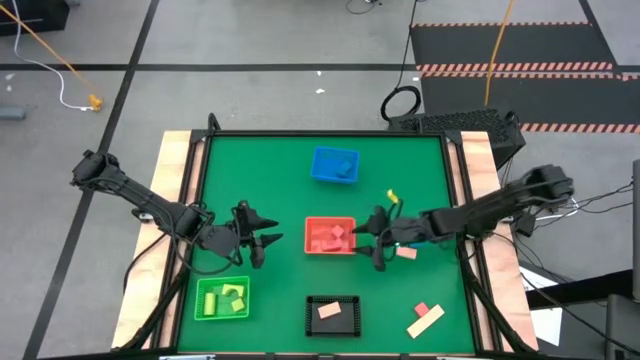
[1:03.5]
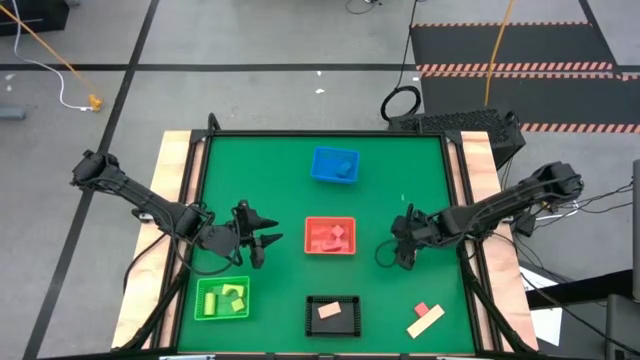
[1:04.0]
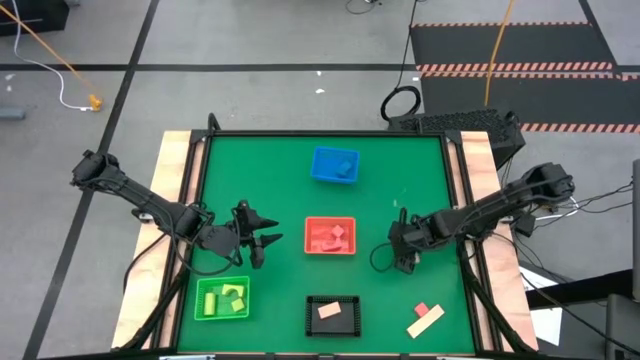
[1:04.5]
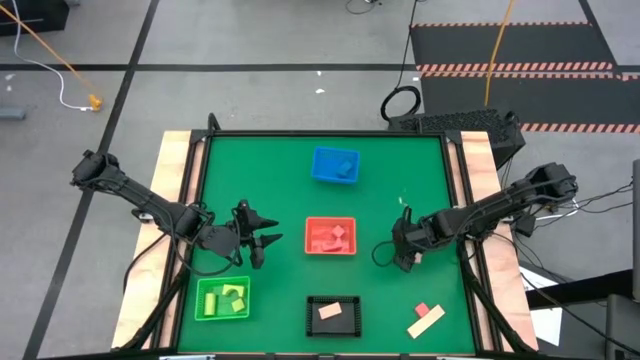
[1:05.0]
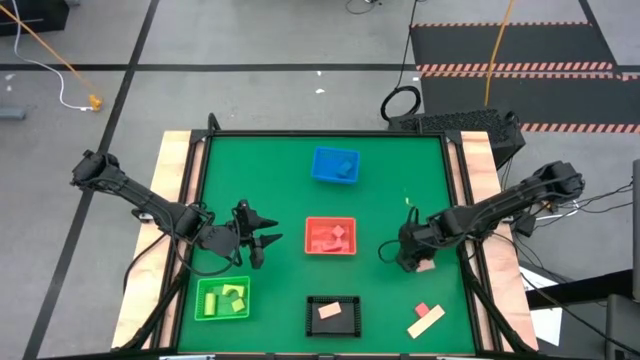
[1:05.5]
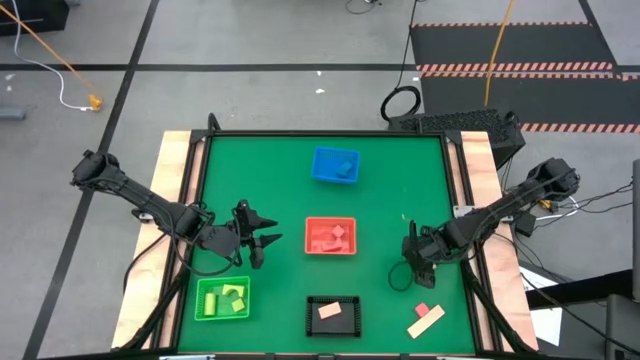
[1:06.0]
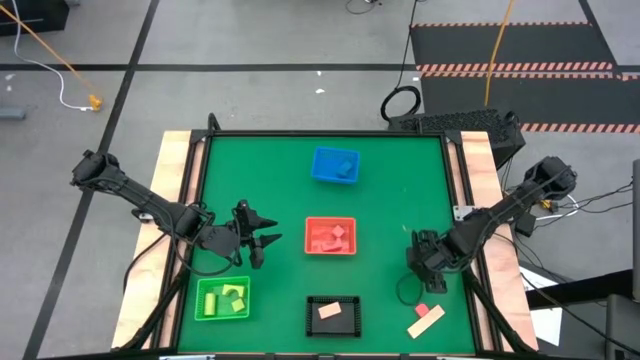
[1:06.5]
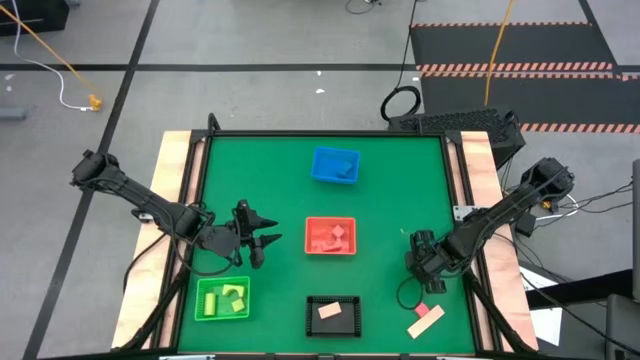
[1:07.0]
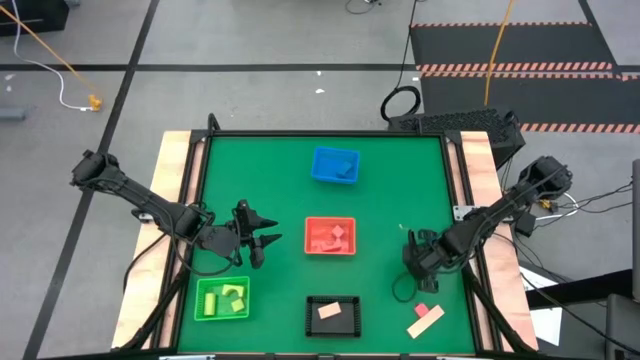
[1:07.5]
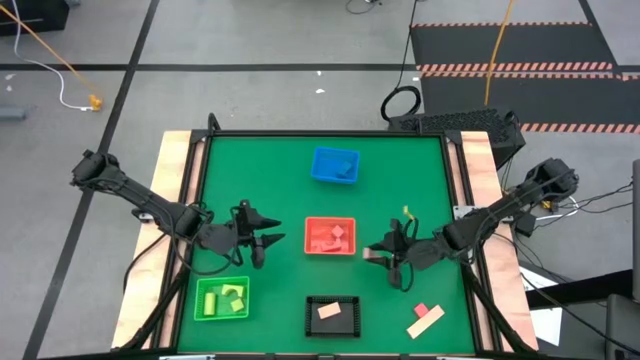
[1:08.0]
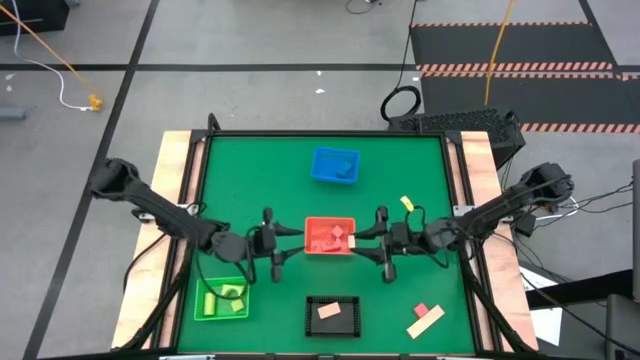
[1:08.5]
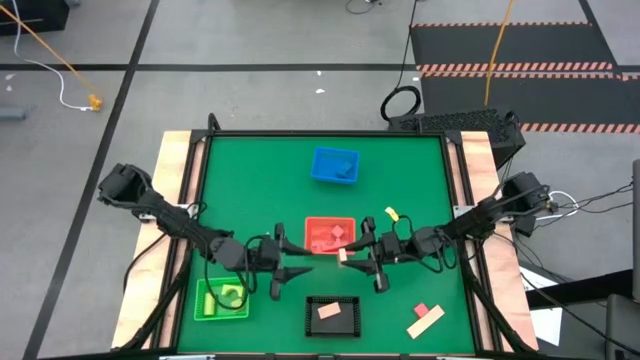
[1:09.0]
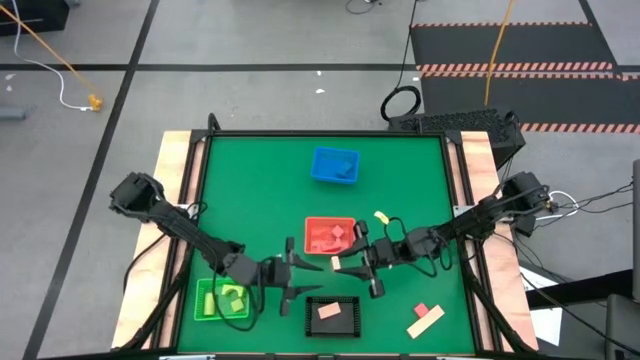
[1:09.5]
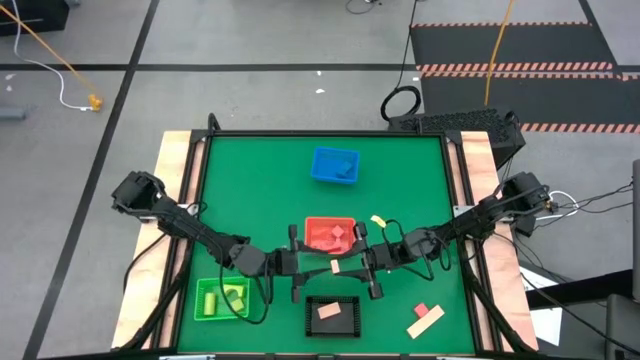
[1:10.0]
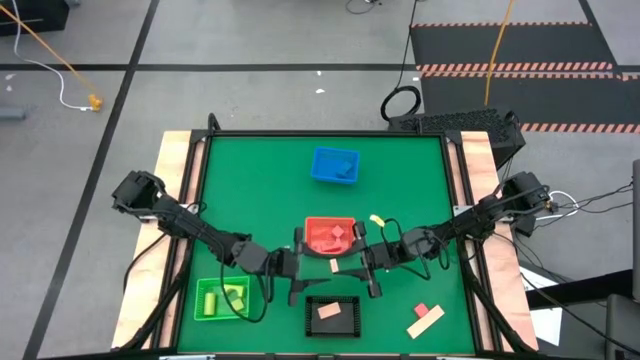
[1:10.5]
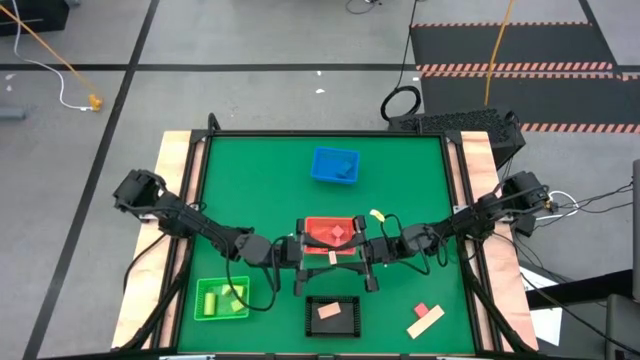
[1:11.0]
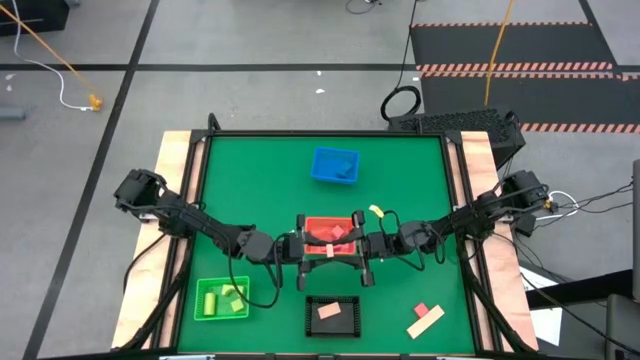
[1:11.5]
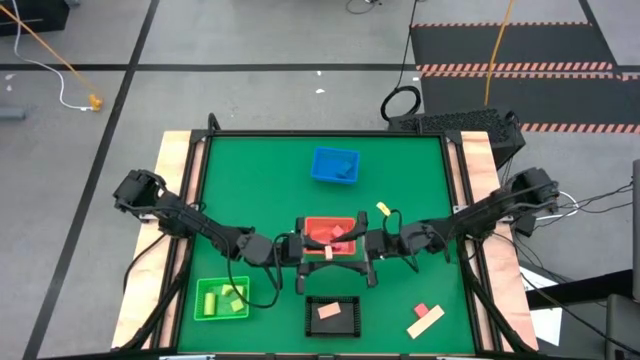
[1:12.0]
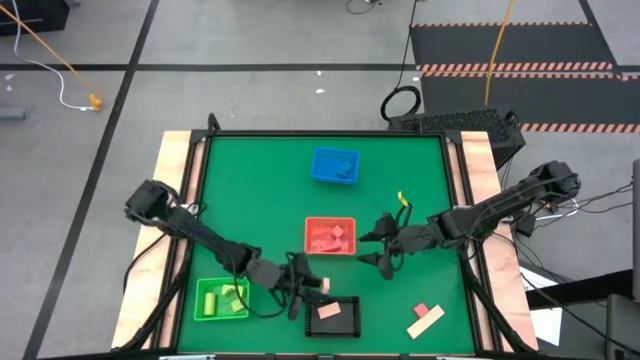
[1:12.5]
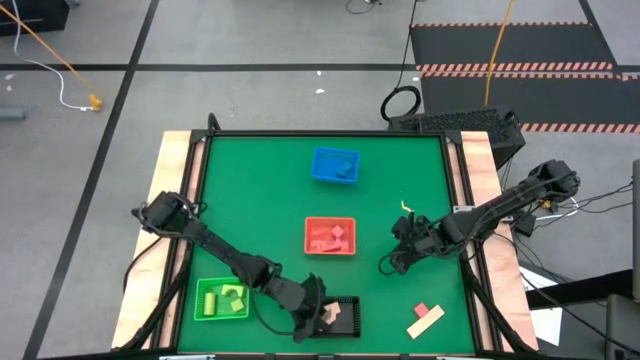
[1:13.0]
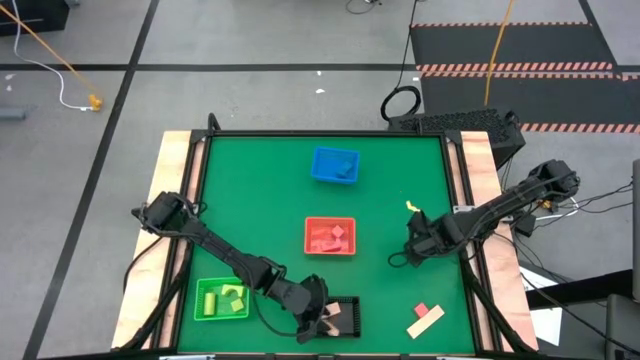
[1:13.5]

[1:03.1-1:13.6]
Task: Sort & place blocks by color
Put the top brown block into the black bin

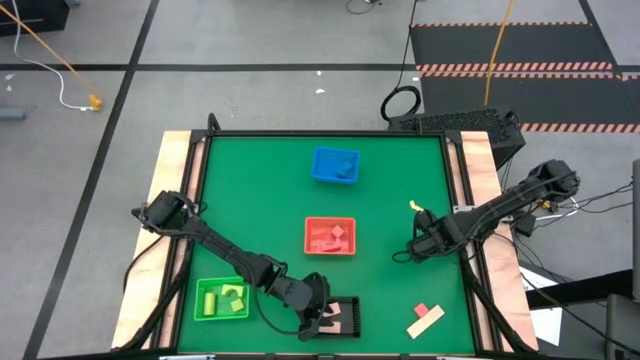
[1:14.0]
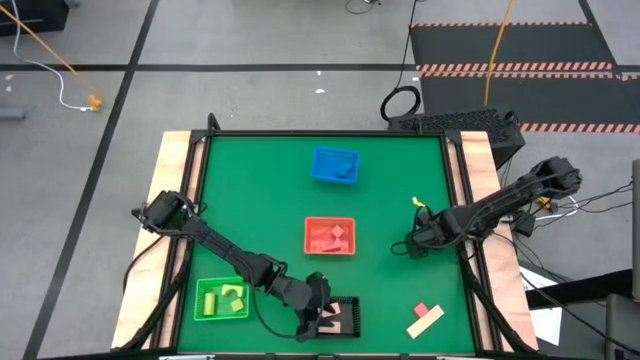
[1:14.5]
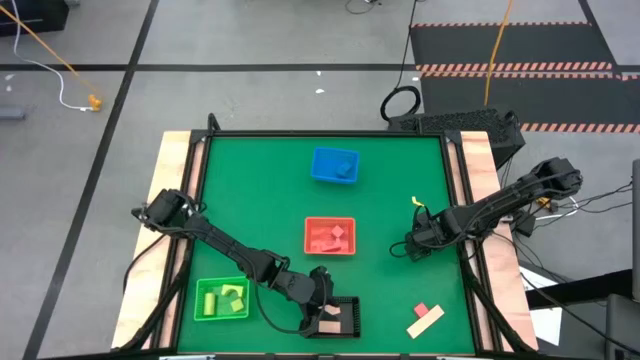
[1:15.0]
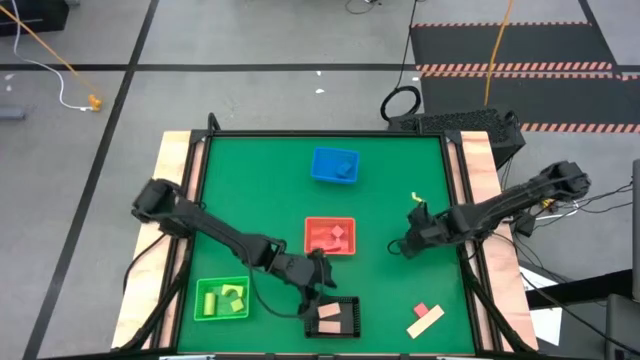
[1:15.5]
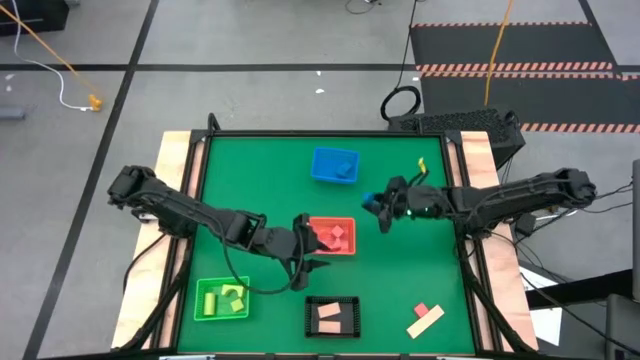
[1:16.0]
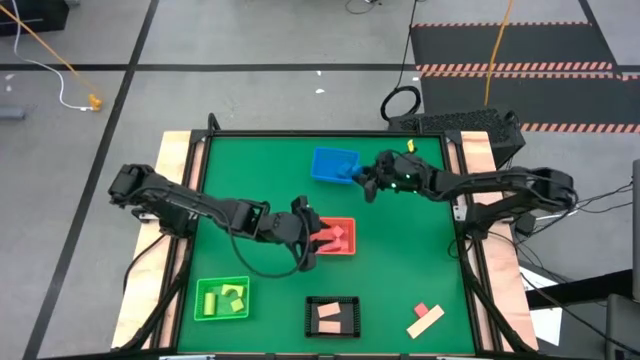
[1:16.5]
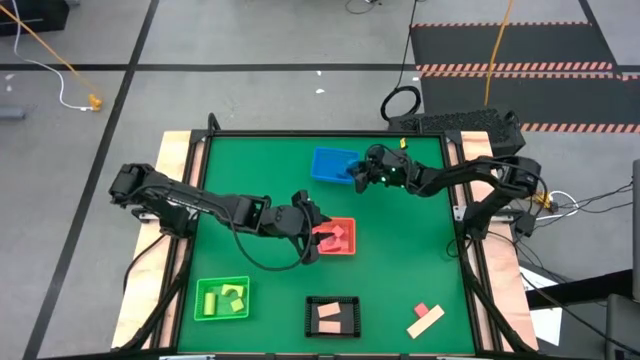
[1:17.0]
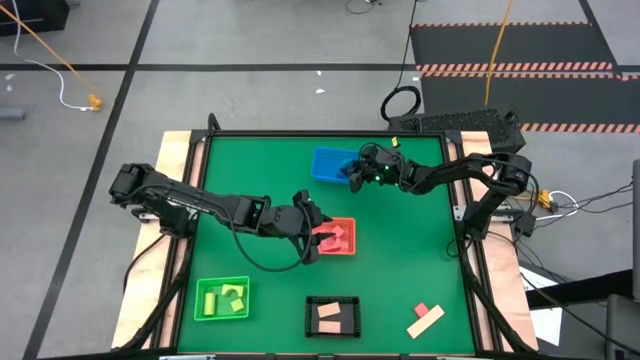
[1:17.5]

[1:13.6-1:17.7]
Put the blue block into the blue bin

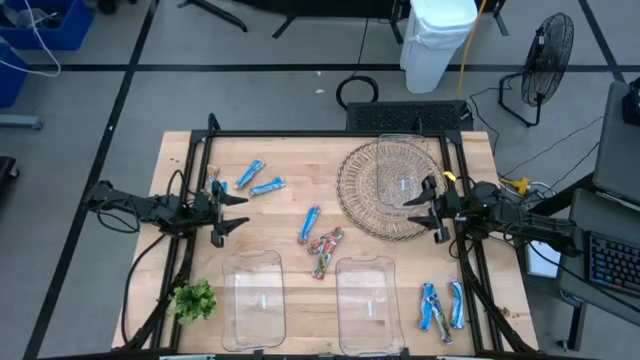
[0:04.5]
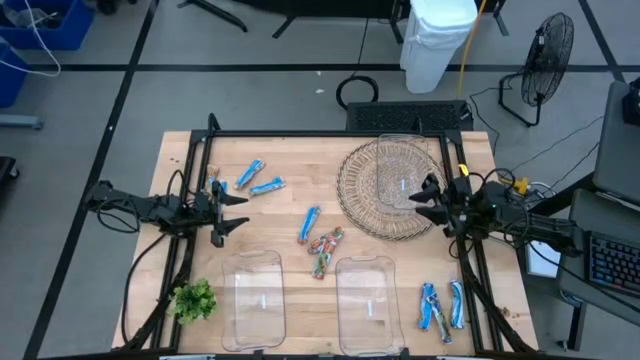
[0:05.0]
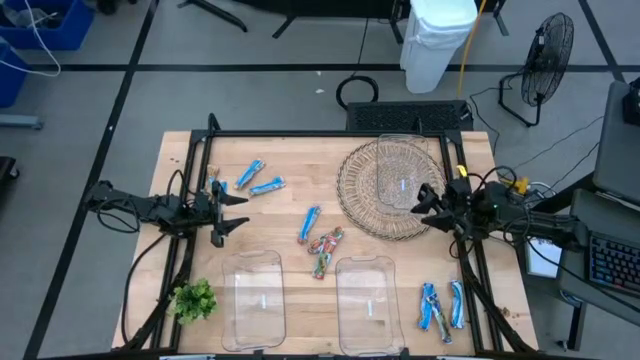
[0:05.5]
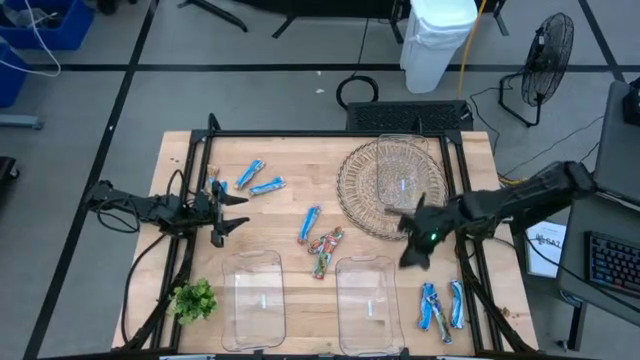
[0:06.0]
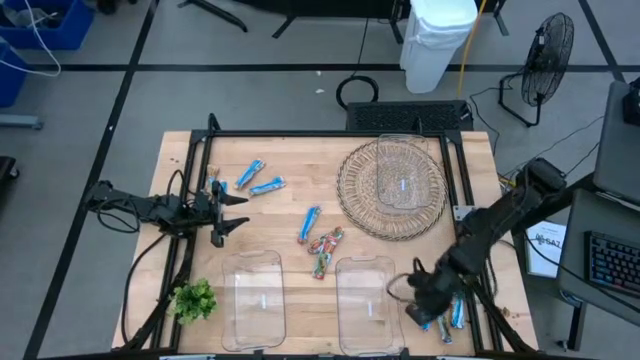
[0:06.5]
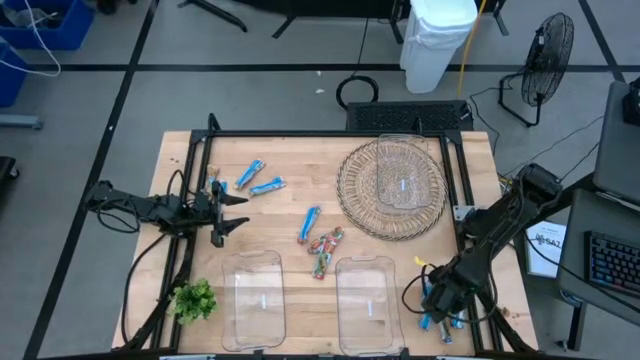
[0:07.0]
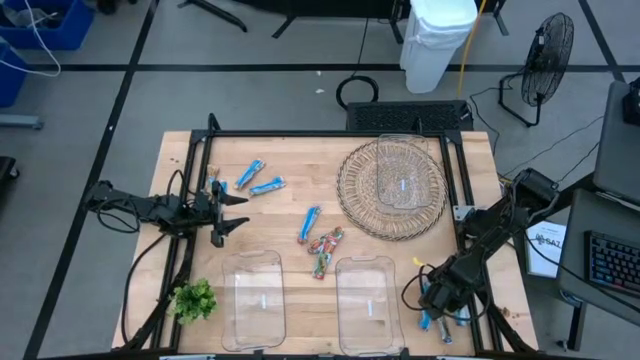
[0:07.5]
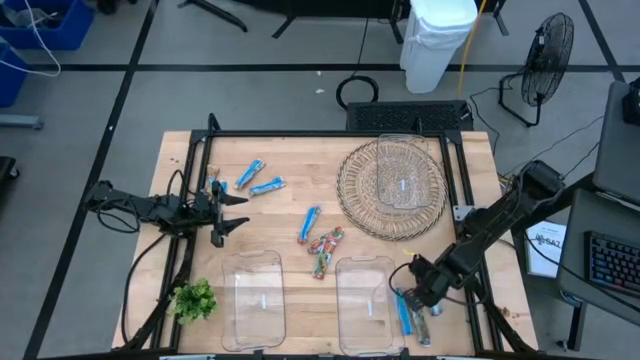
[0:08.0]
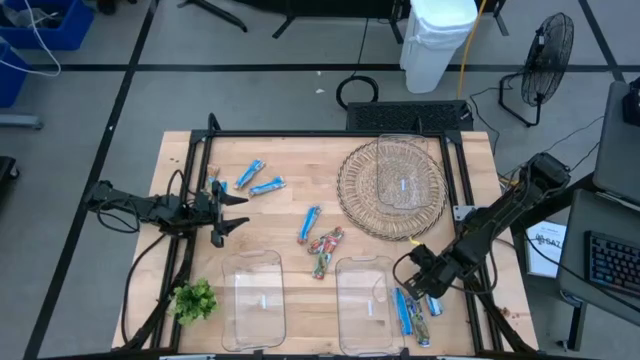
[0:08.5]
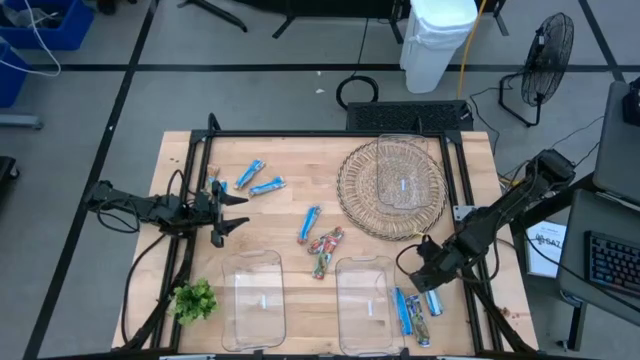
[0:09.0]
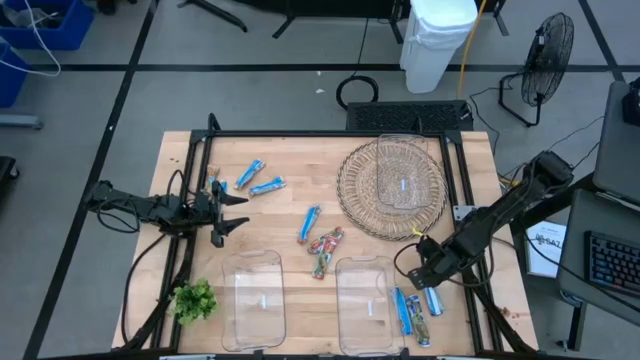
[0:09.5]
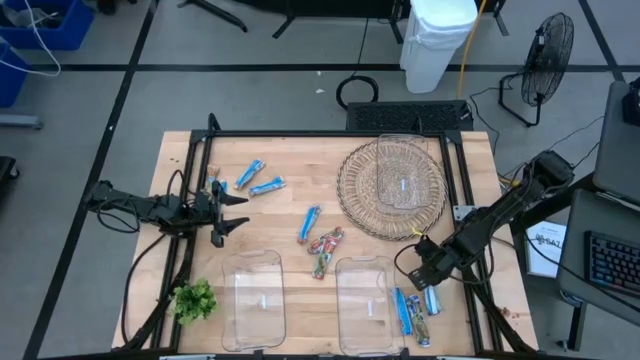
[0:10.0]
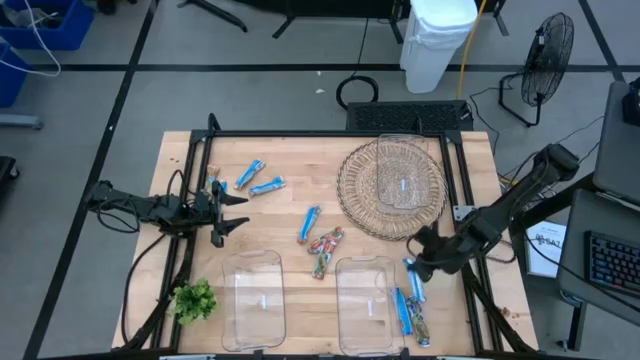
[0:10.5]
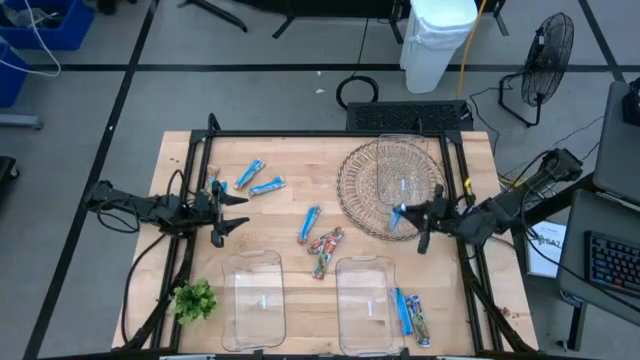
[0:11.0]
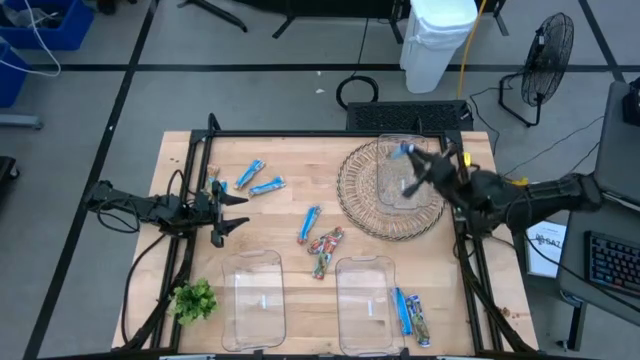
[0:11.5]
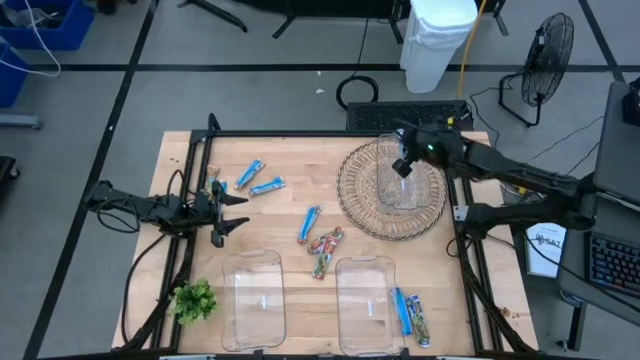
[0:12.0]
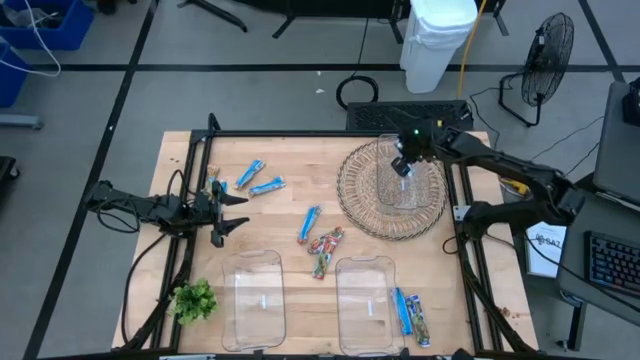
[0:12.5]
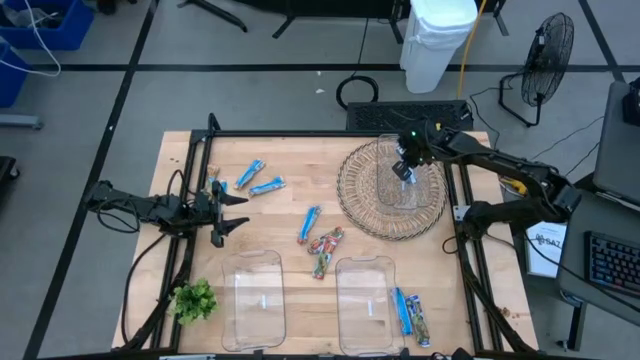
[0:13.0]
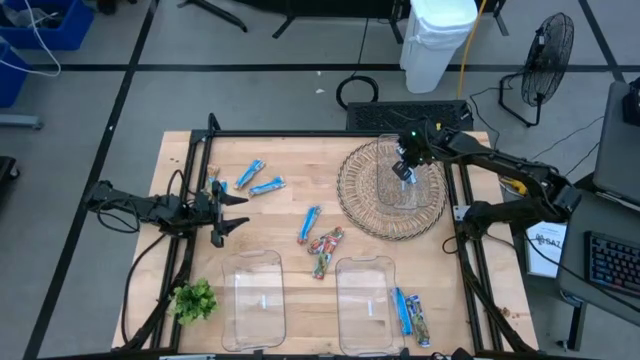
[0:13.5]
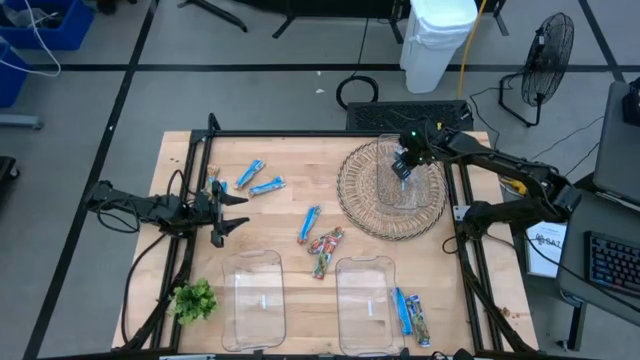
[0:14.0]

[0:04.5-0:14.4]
Task: Pick and place Granola Bars by type
Put the right blue granola bar into the top transparent bin
